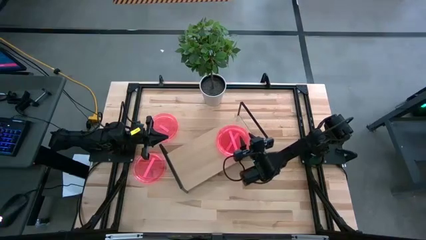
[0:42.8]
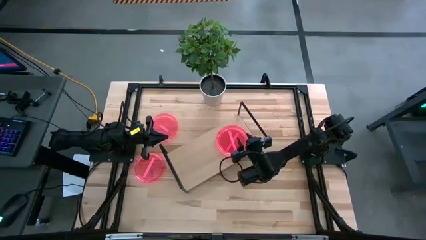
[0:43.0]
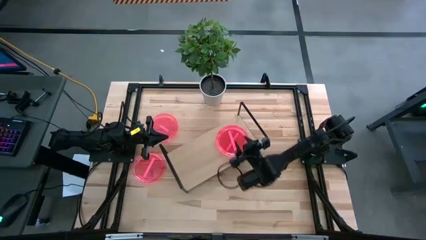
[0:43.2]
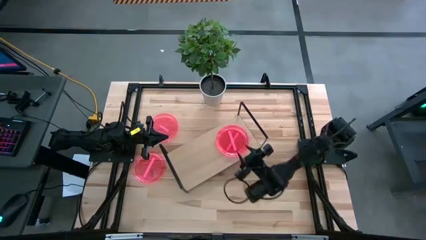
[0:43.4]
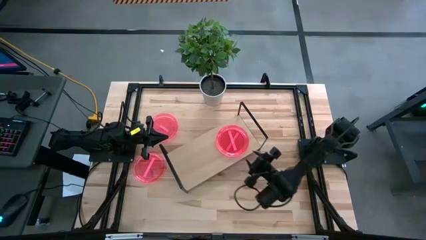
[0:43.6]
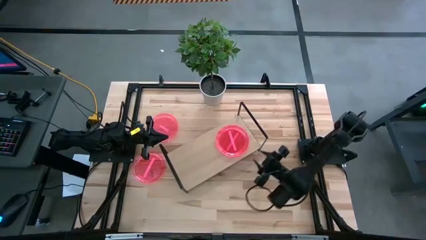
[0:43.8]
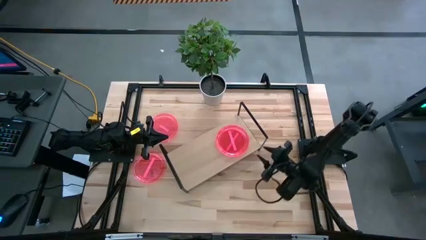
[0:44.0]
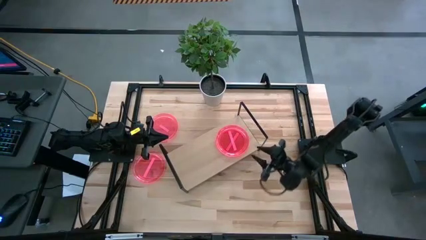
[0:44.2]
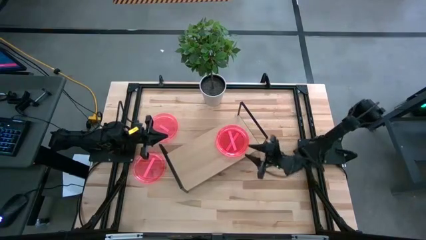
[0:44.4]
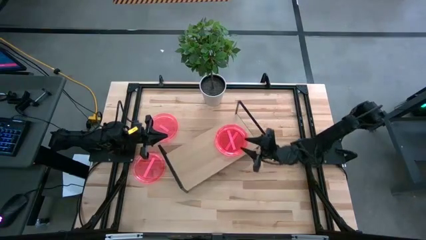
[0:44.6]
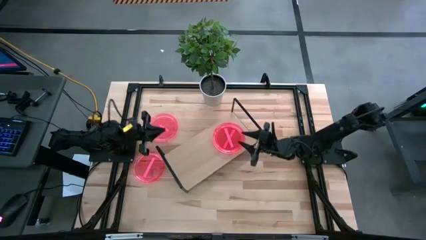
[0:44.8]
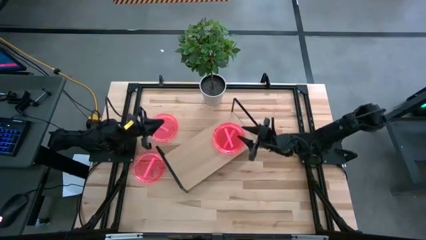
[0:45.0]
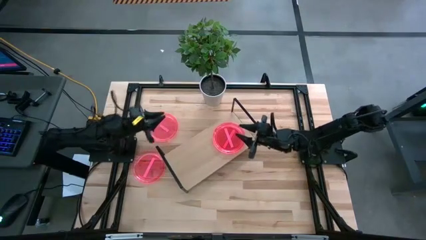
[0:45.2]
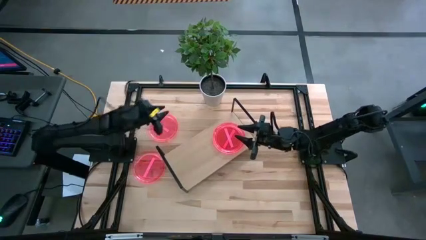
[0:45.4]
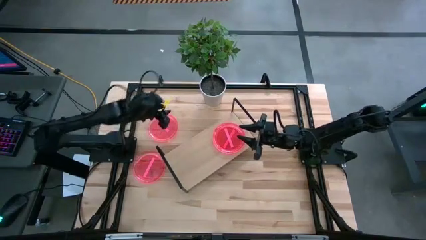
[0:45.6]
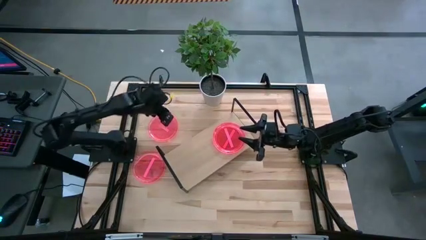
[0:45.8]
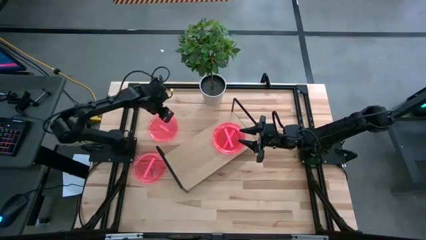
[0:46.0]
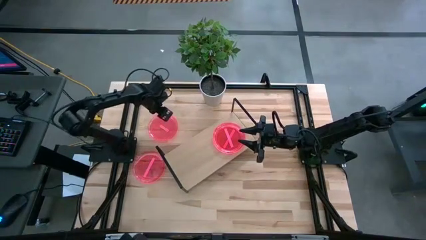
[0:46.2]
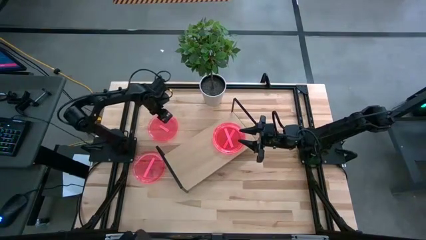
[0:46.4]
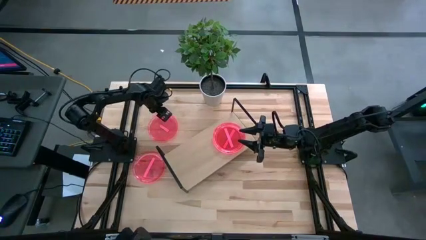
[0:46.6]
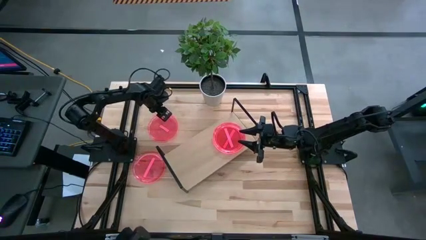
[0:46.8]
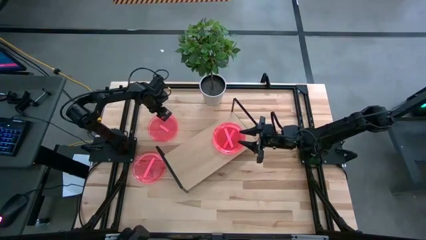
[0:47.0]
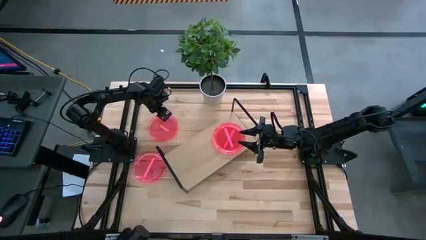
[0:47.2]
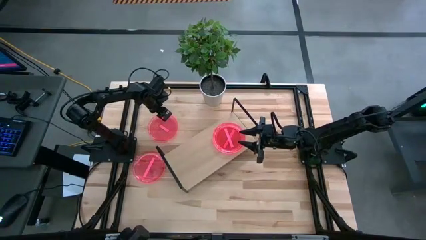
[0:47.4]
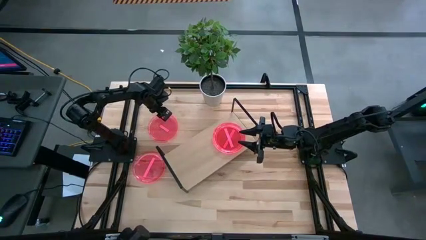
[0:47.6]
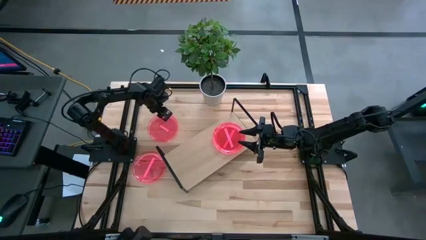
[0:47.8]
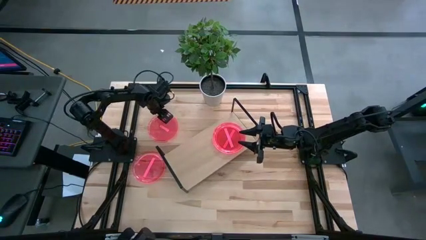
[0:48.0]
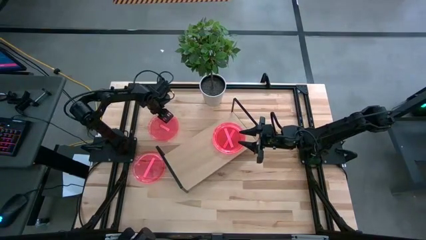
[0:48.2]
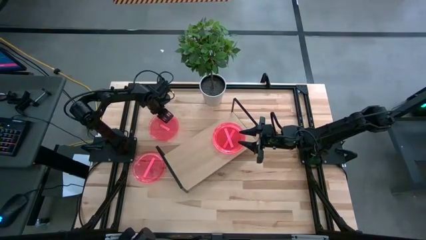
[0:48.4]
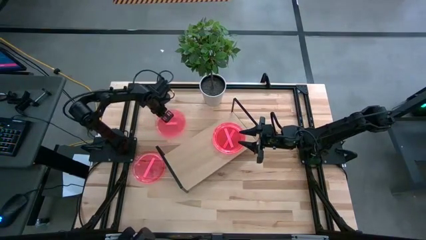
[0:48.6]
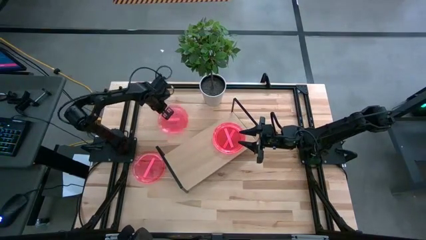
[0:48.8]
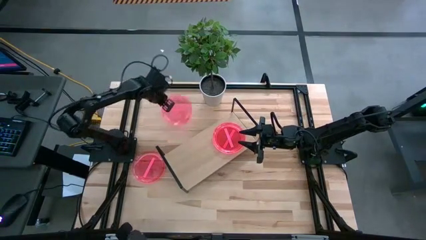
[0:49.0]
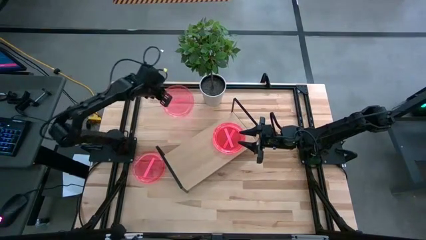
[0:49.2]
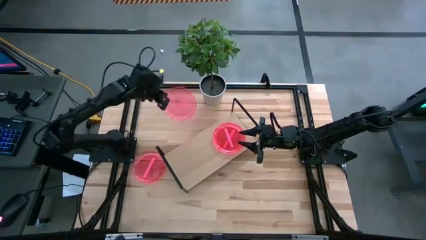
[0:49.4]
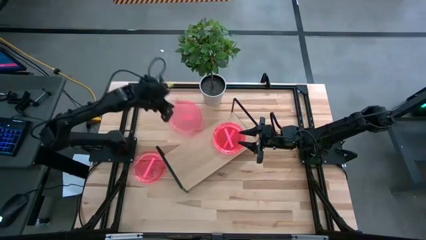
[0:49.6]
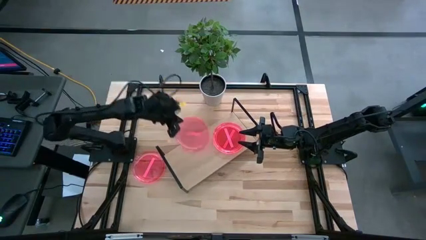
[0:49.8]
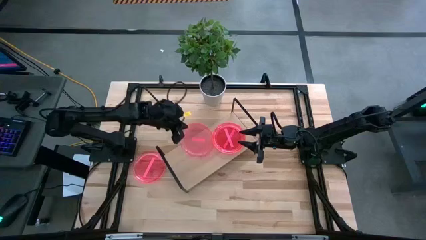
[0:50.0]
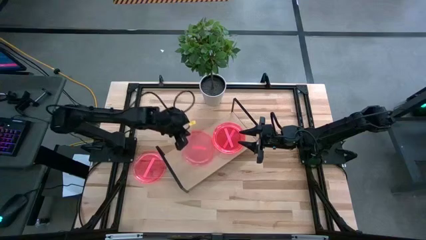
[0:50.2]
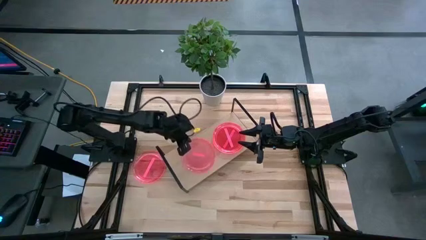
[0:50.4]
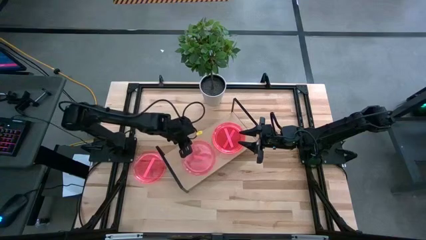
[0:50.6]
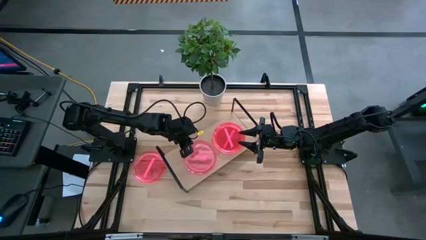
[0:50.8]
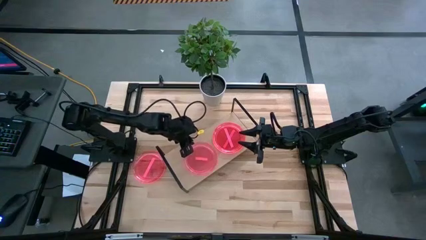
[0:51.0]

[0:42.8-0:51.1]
Task: Place and stack plates onto a shelf
Put the pink plate on the shelf

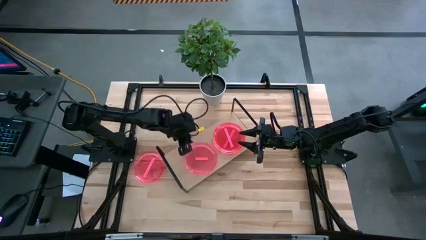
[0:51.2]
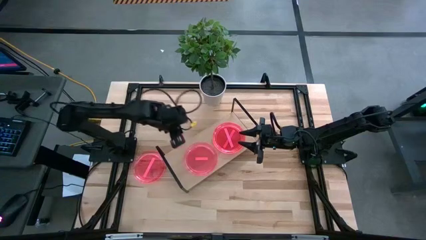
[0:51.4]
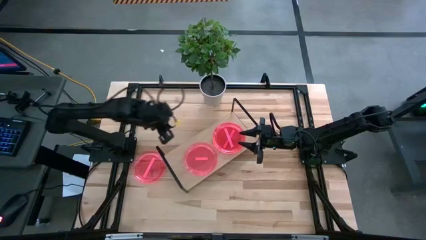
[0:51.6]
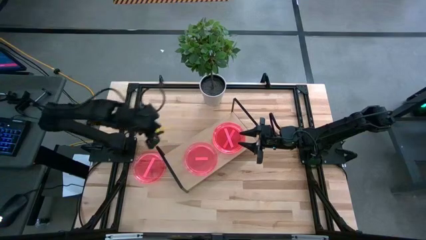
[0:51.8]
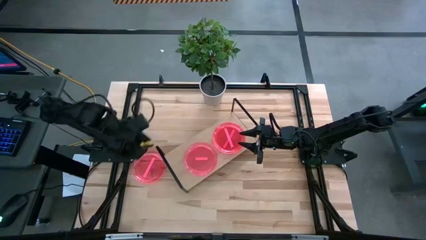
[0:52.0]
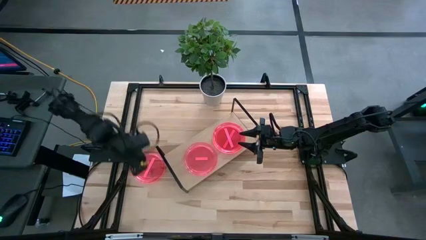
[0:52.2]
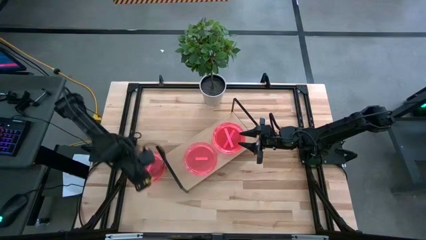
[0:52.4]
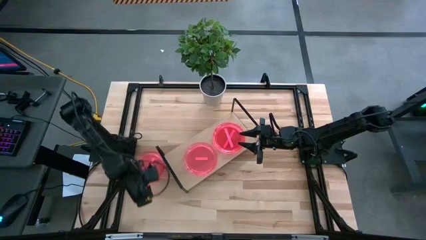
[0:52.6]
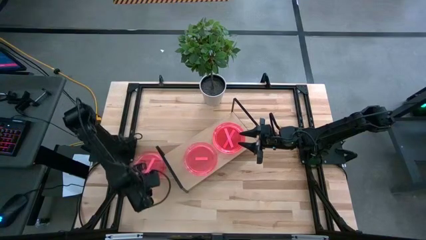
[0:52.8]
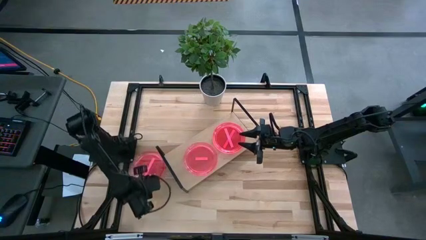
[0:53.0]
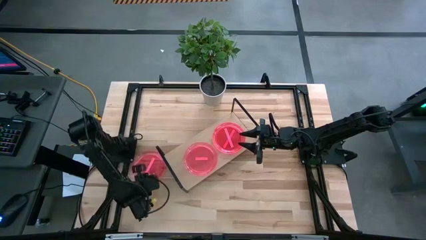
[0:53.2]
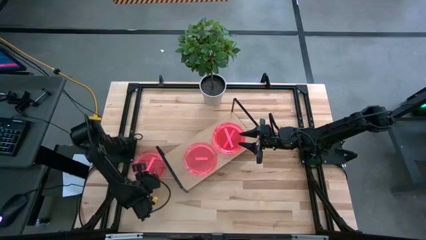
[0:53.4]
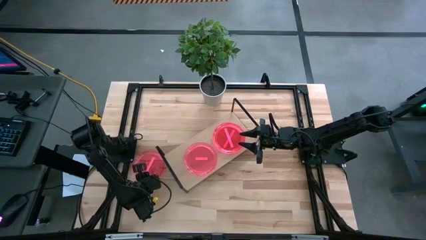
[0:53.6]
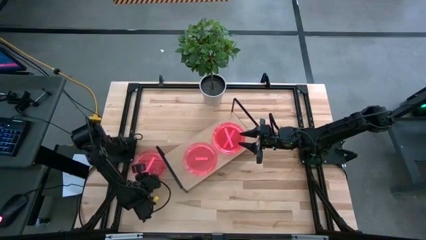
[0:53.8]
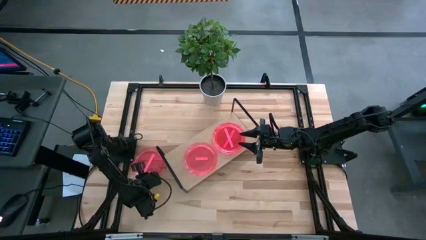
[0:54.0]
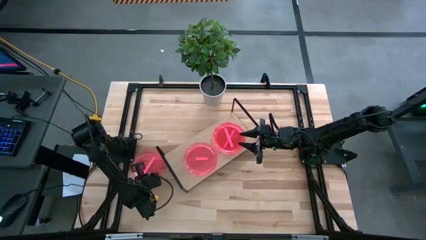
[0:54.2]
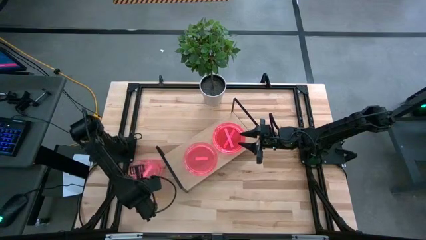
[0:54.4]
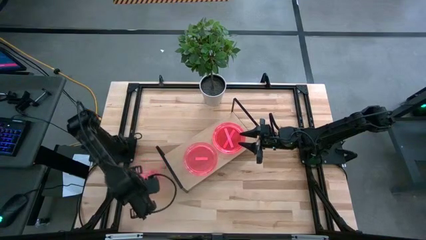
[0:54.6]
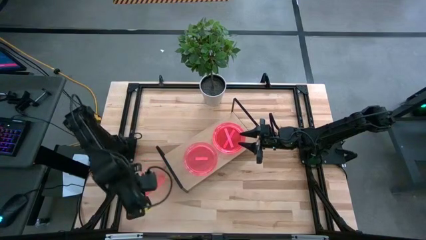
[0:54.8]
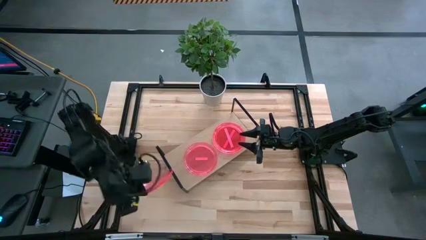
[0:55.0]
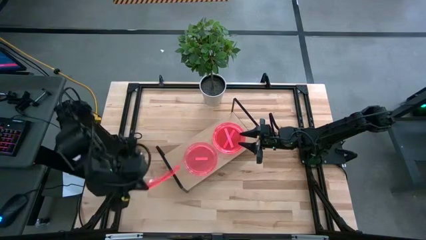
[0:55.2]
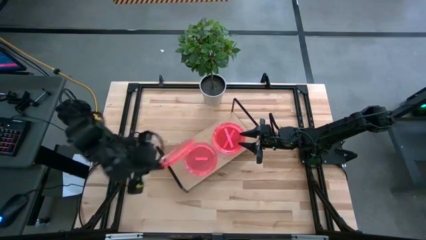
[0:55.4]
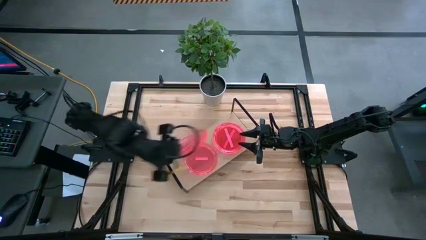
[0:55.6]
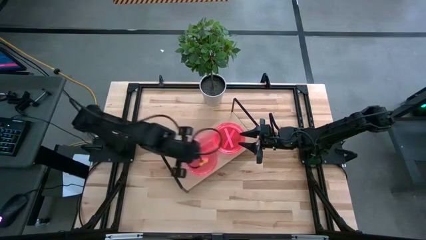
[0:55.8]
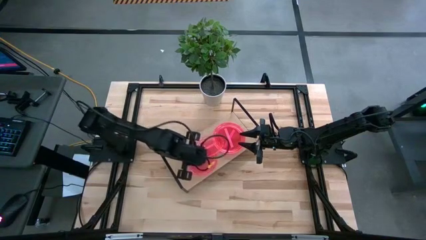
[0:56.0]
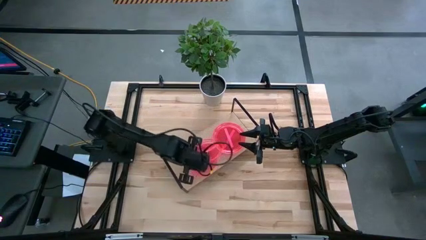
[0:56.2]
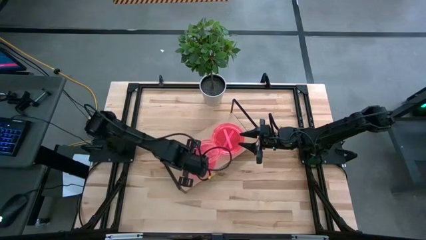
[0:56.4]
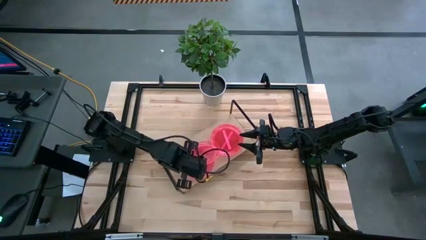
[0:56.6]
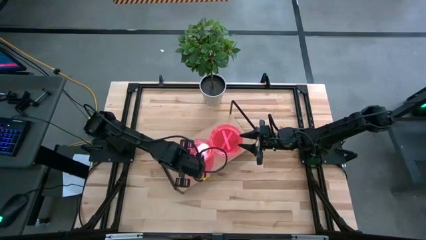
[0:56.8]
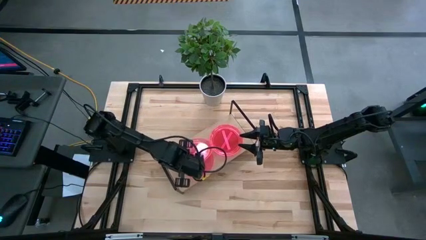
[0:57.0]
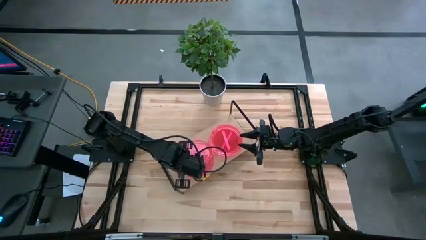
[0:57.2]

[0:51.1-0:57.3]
Stack the pink plate on top of the pink plate on the shelf

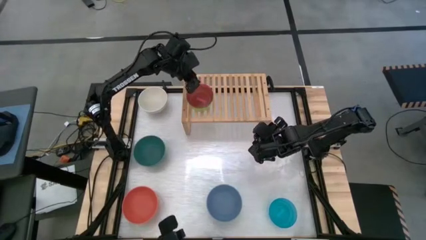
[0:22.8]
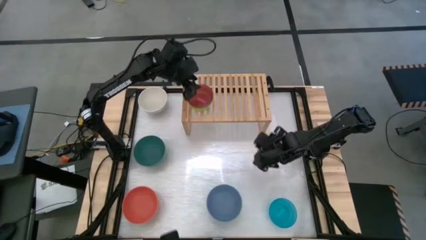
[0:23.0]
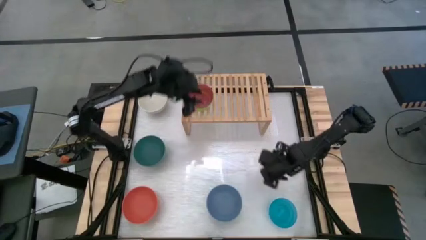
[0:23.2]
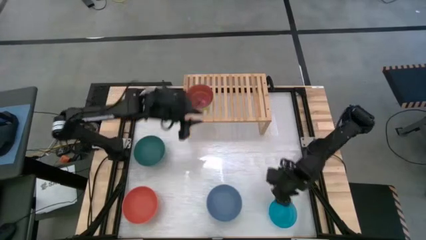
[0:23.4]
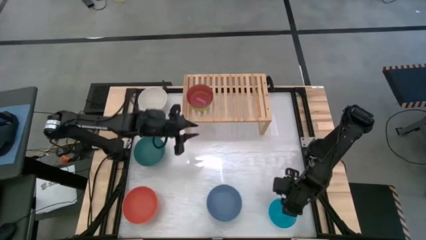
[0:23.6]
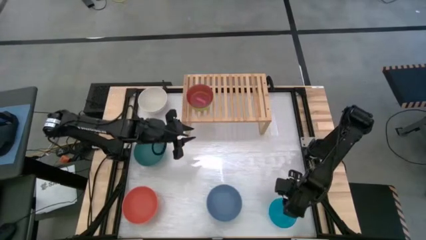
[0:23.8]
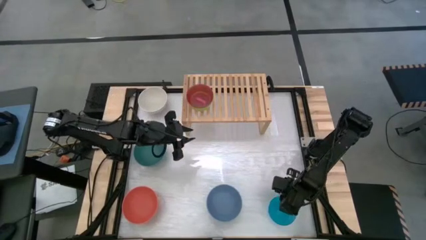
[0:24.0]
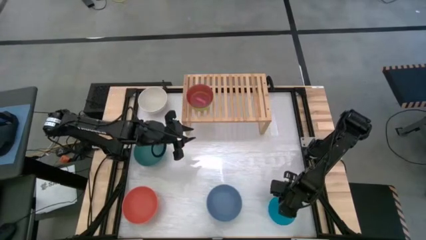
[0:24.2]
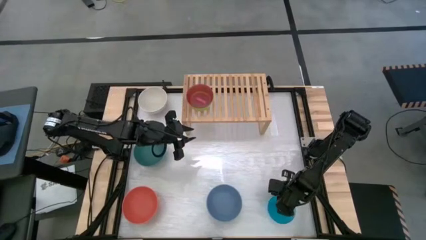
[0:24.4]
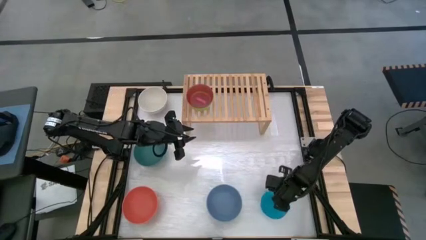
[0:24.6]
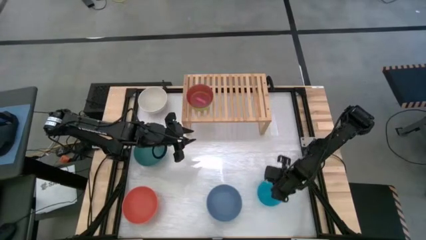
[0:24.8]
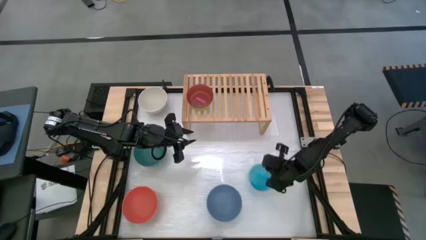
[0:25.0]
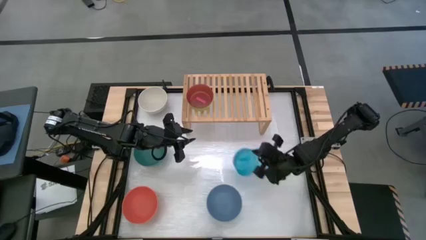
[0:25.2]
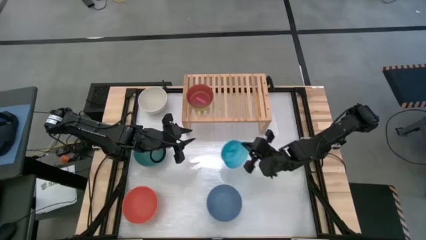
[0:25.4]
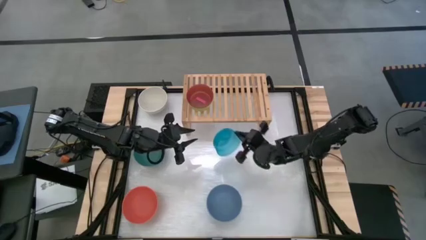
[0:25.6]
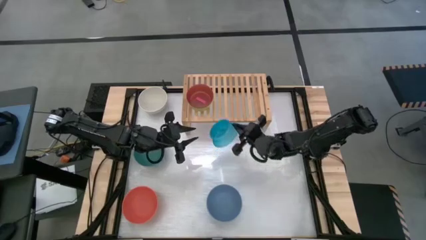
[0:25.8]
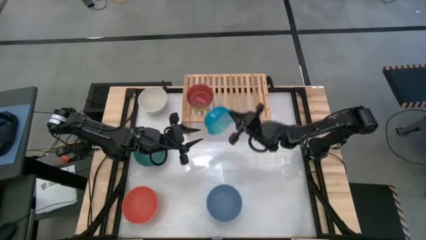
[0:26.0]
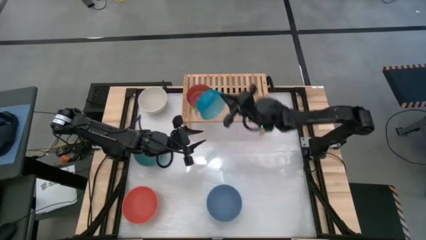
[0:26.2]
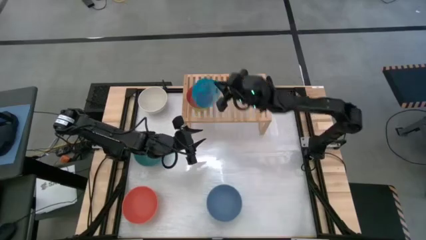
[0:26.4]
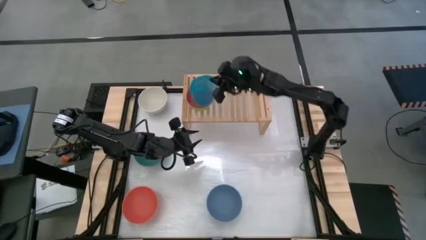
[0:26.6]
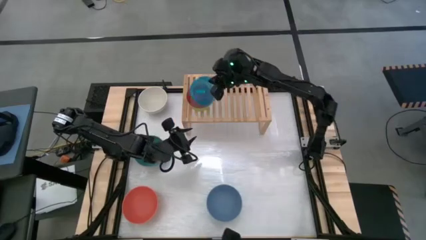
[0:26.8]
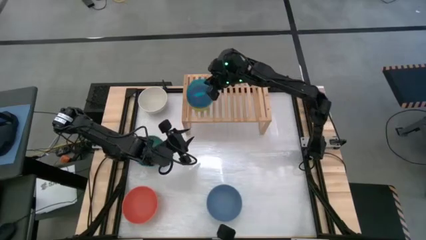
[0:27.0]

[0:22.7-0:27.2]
Task: Place and stack bowls onto a shelf
Stack the small blue bowl on top of the small pink bowls on the shelf
